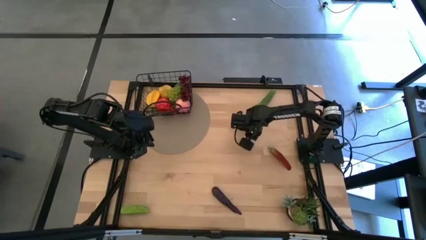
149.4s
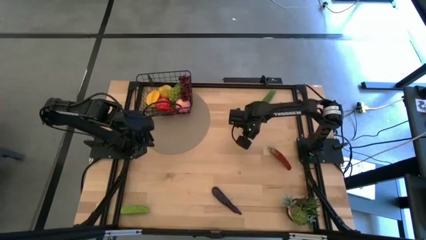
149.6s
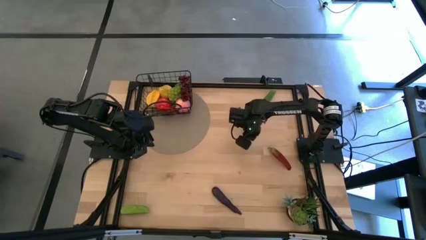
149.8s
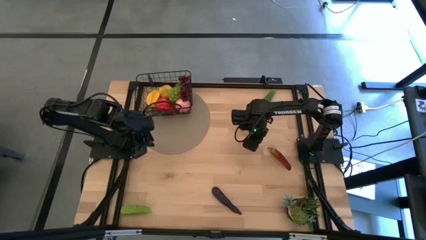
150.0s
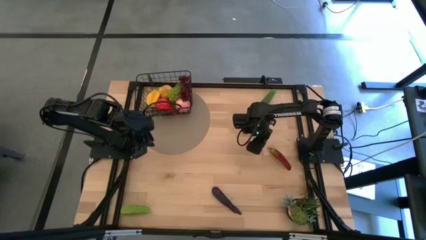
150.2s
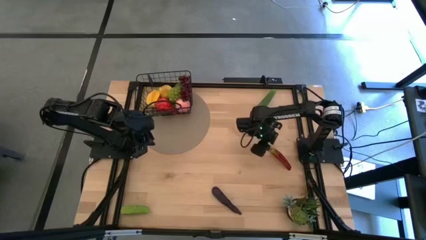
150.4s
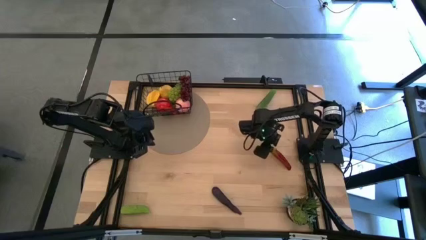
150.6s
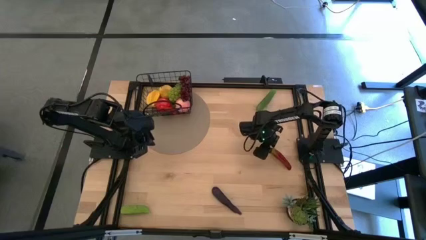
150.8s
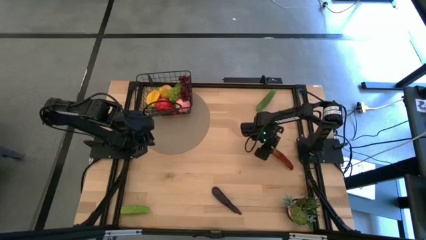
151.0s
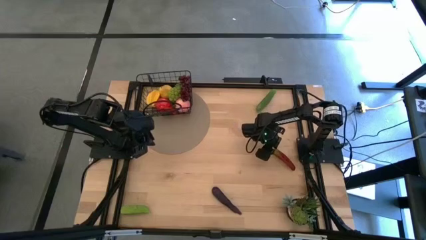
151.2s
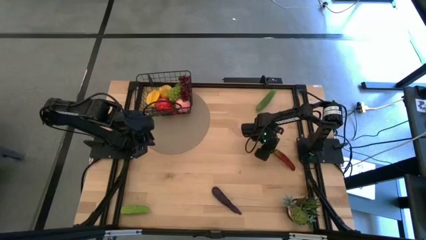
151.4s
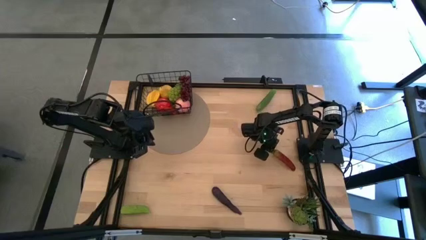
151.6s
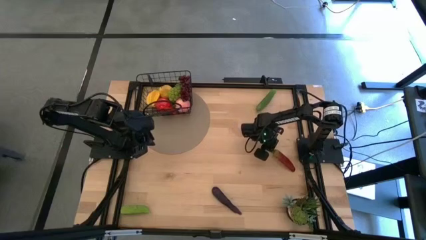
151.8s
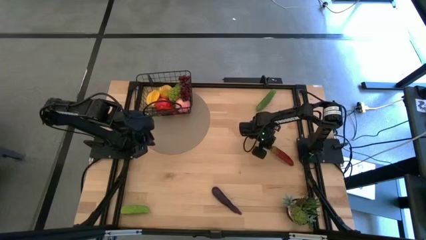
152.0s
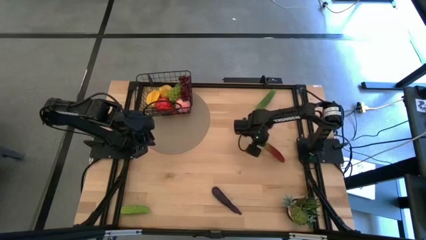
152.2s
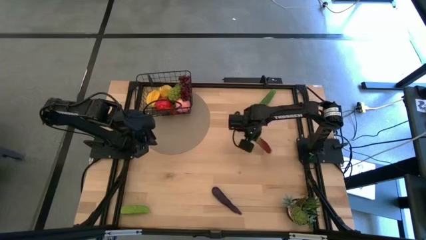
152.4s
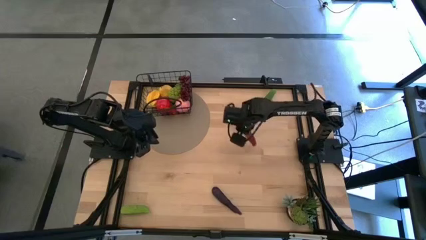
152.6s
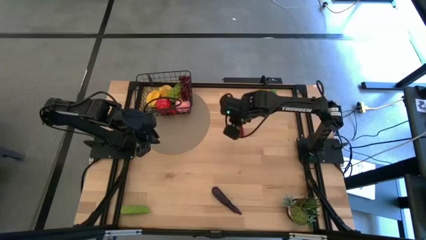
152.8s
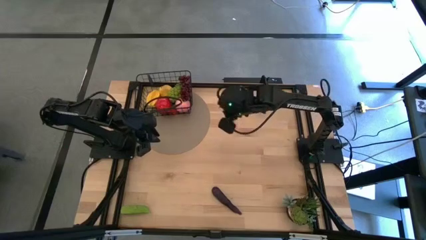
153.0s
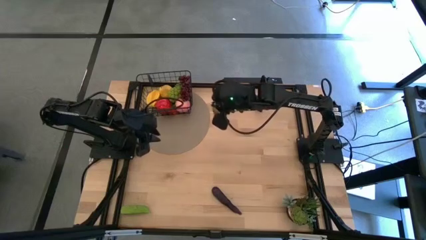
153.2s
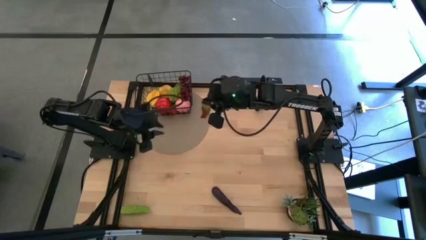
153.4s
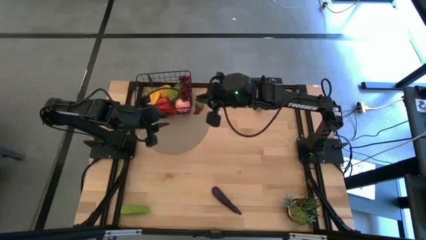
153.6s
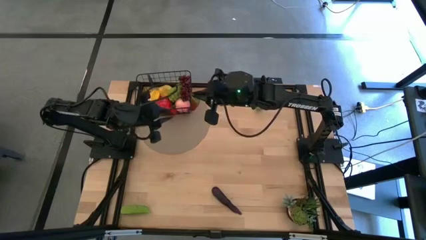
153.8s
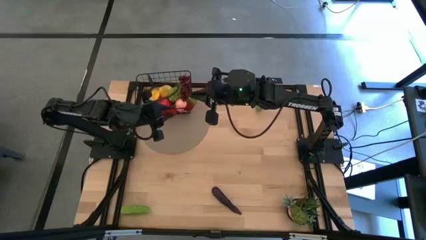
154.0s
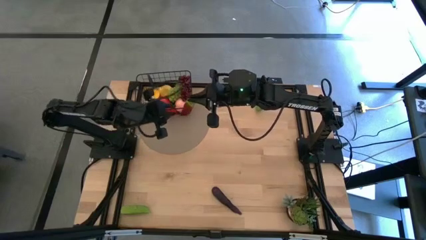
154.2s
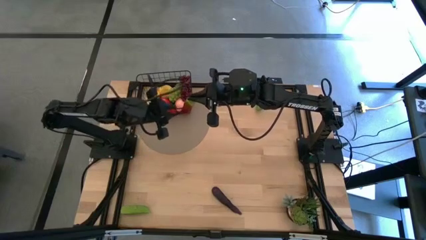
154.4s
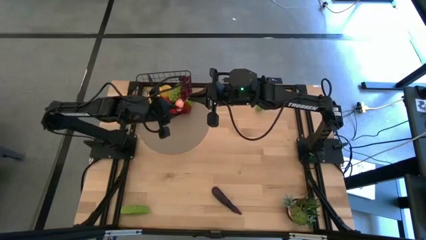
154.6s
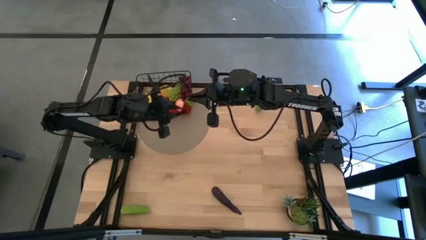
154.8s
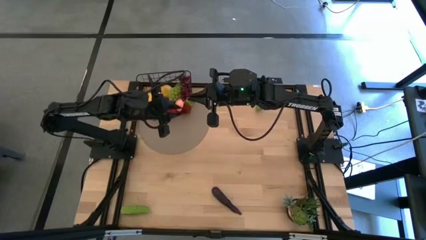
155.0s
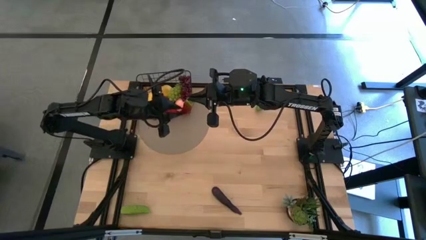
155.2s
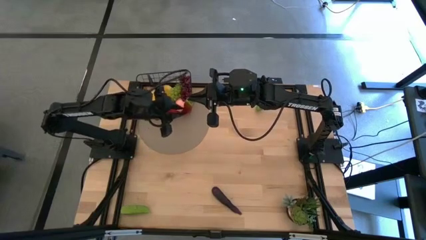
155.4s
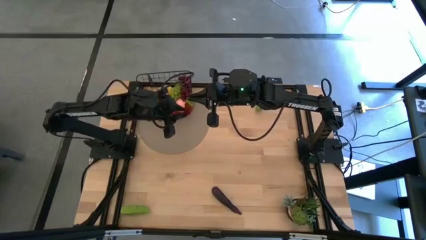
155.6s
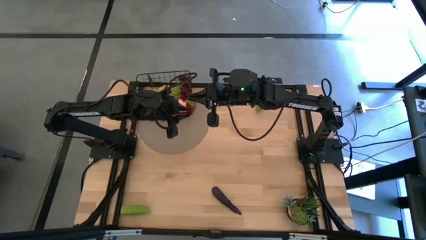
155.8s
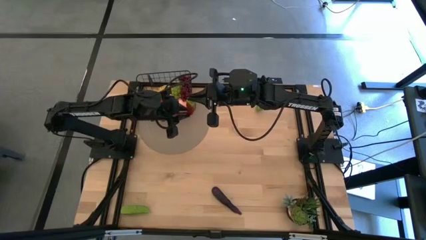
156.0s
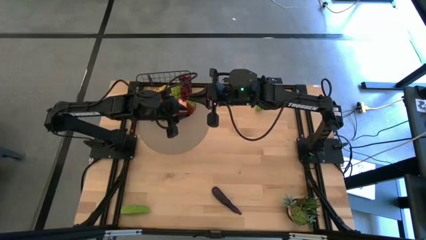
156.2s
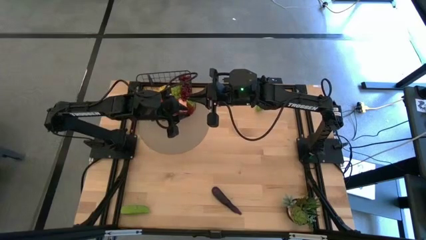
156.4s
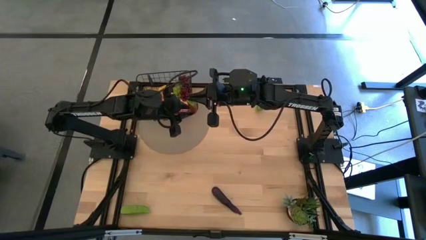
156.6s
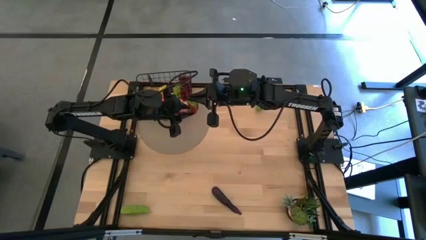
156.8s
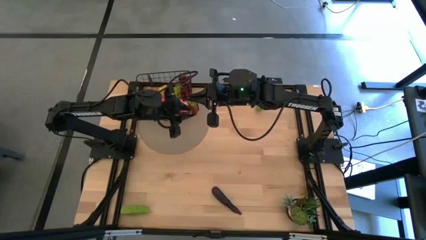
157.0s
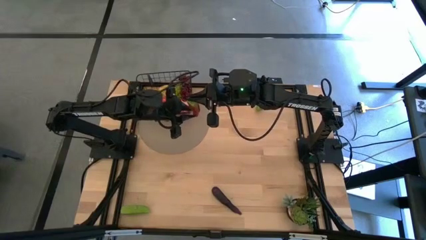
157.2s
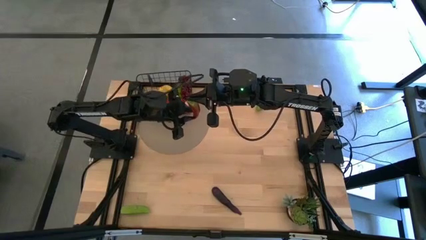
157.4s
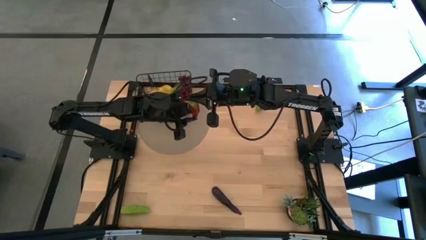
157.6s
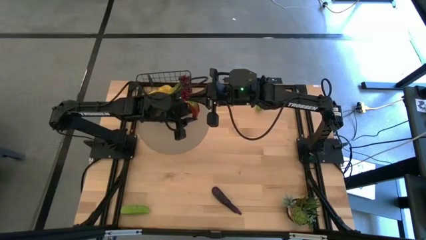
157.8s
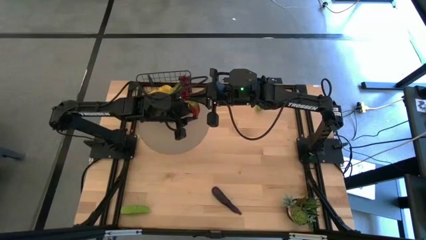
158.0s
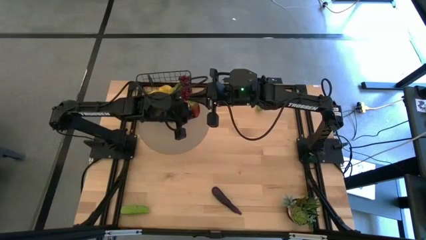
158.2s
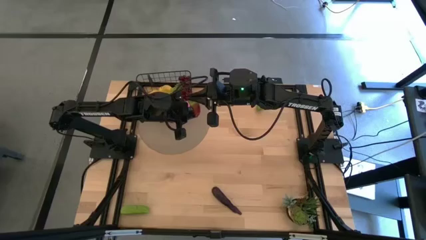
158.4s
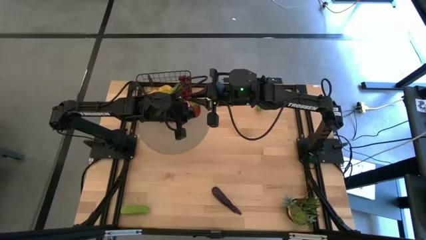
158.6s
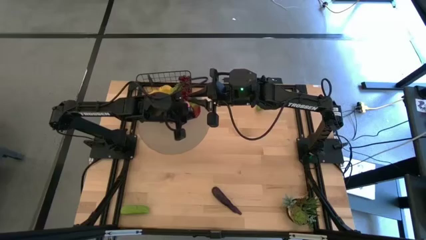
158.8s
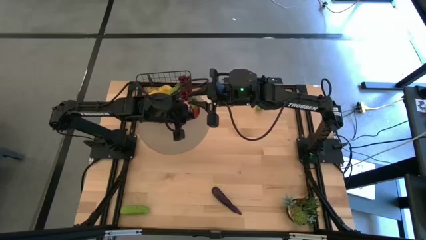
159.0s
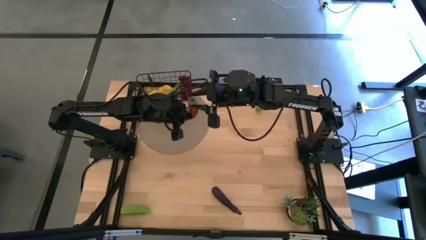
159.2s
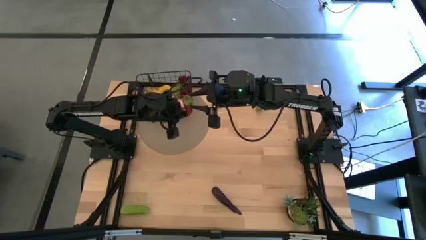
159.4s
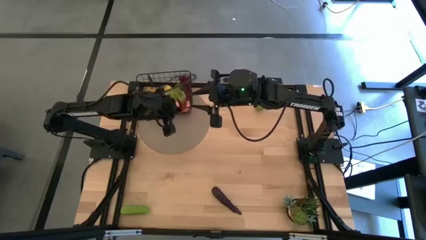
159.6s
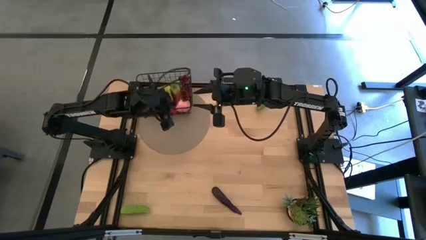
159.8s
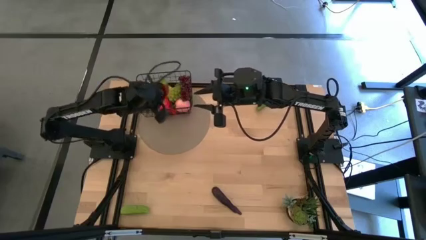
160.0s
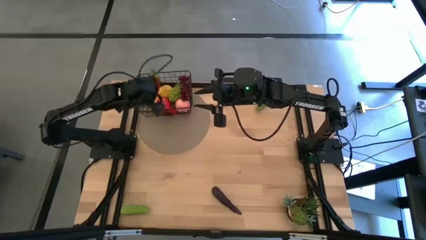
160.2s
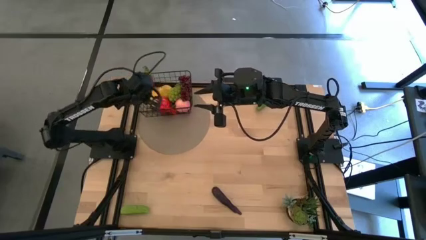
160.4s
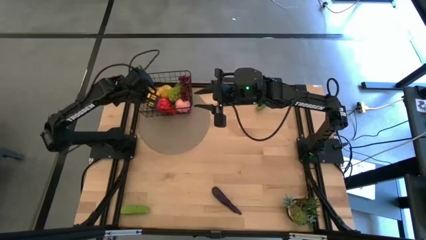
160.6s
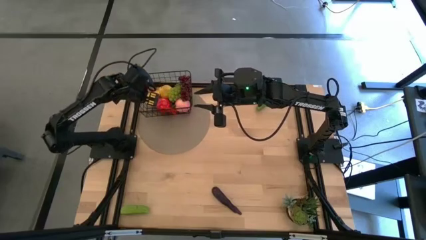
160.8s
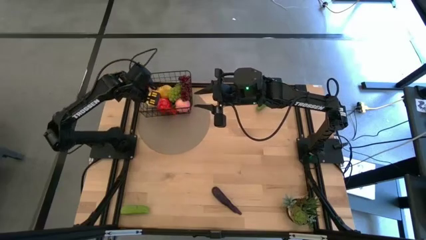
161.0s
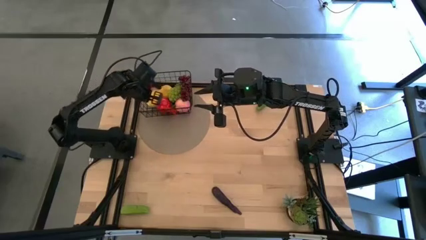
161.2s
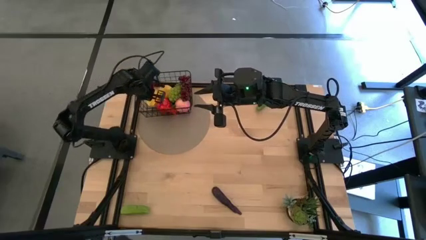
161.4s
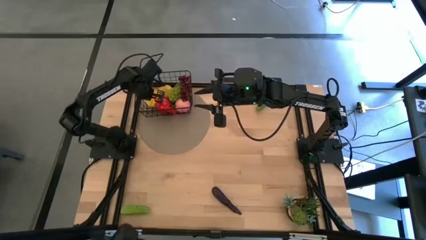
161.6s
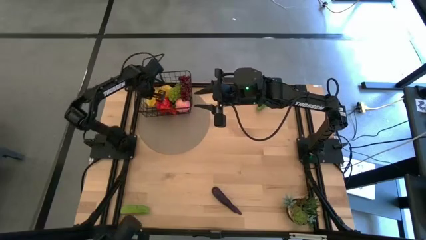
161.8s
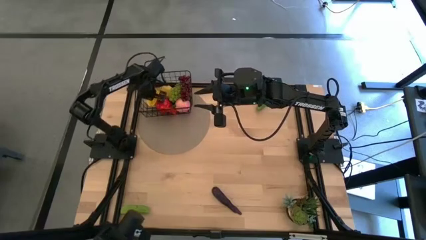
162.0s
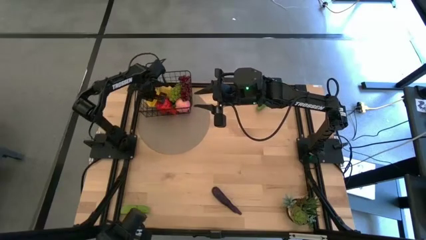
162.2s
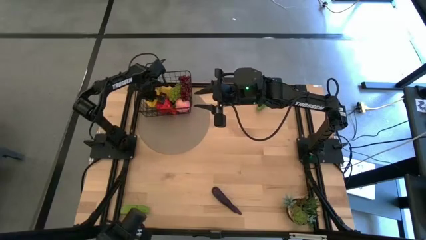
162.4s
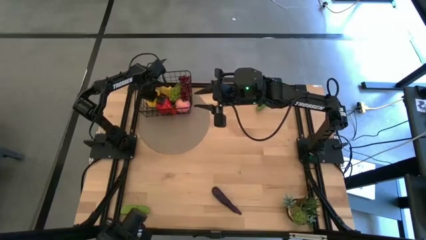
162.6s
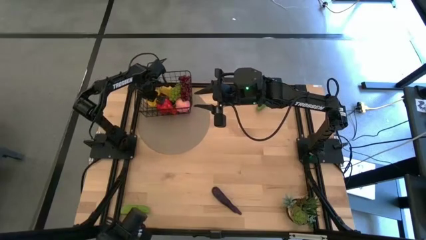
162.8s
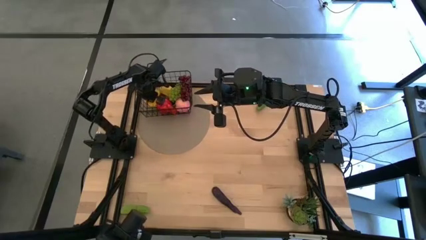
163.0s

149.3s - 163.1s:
Task: Build produce basket
Put the red chilli pepper into the black wire basket

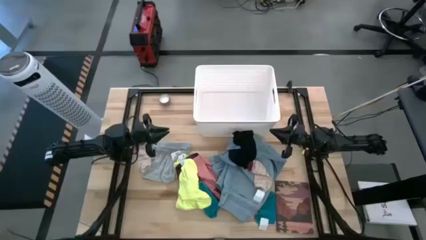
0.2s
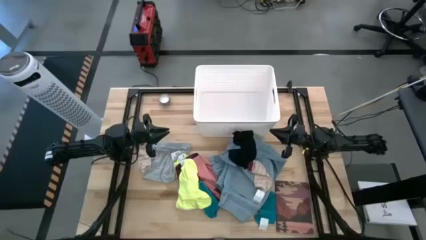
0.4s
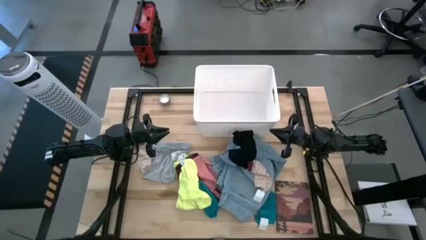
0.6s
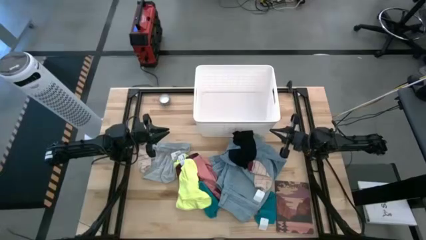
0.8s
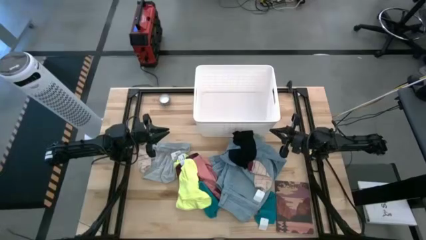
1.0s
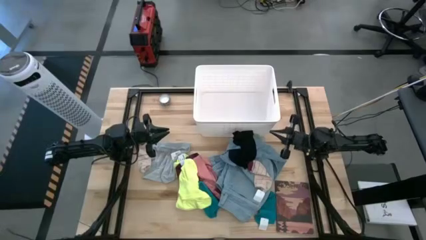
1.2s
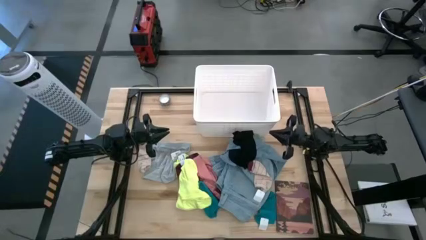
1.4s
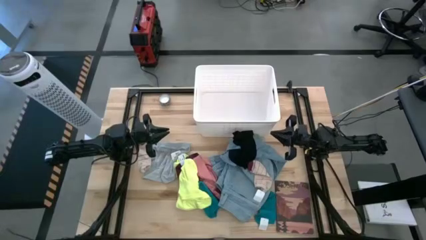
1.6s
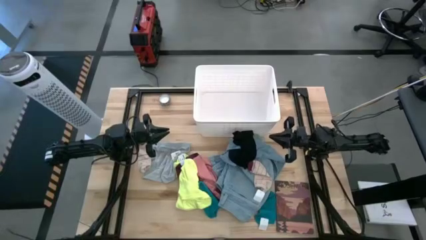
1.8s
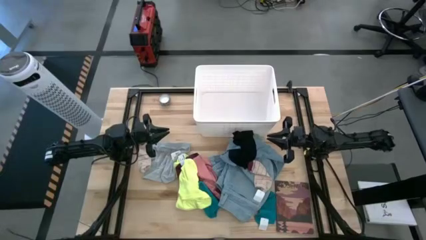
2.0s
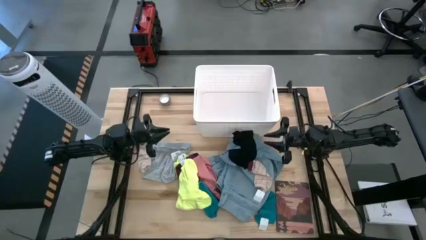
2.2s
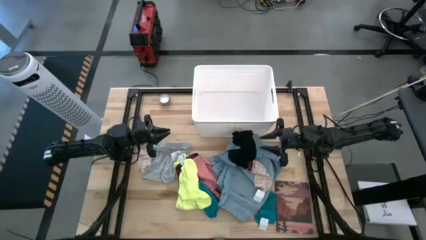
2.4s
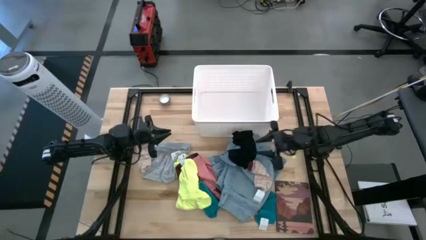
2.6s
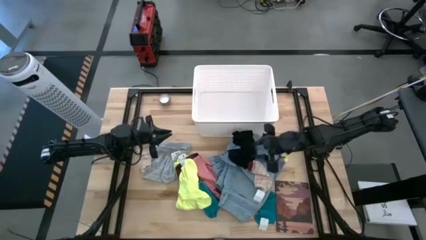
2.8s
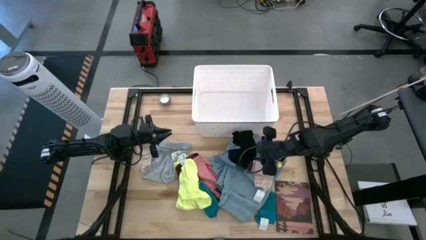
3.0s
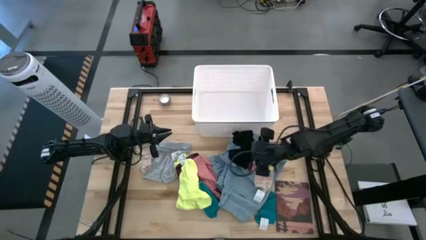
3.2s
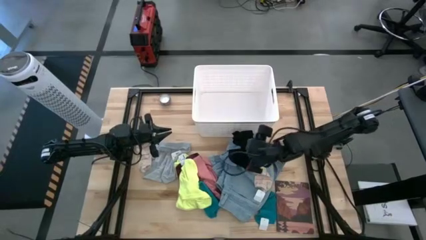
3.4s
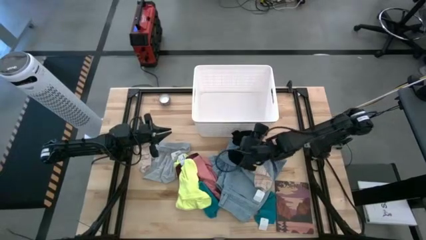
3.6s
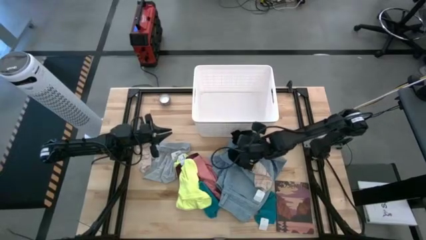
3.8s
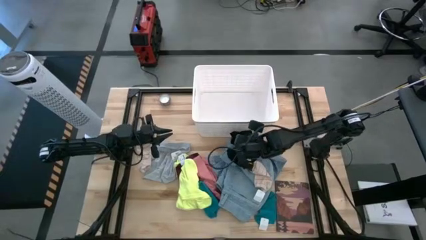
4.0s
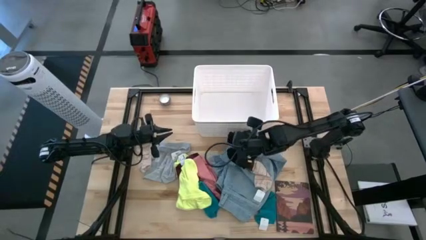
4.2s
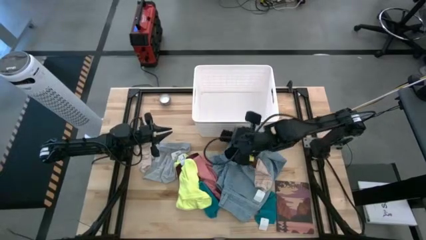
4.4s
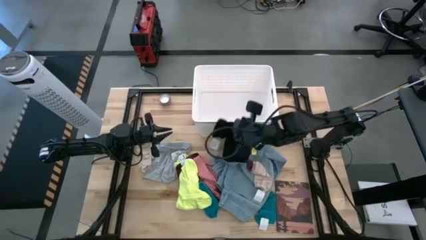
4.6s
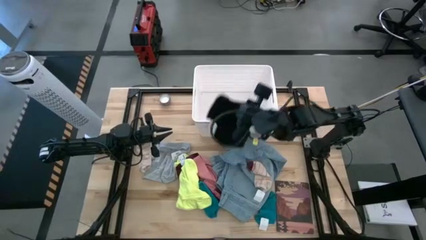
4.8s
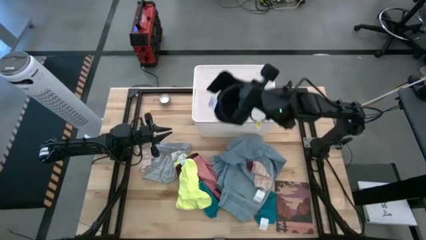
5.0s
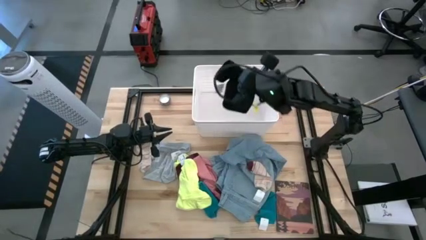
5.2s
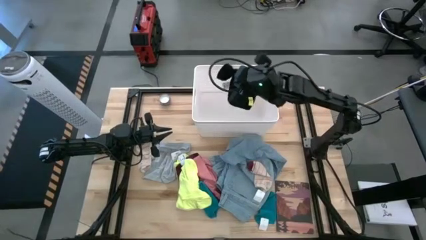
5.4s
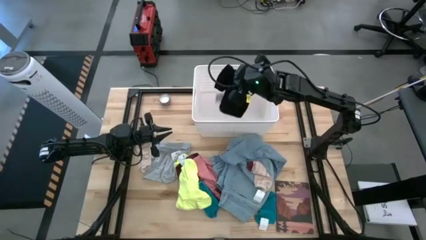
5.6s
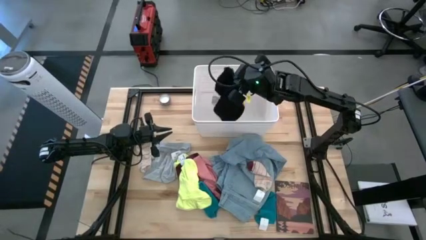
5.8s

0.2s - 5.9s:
Task: Sort clothes
Put the black shorts into the white bin
